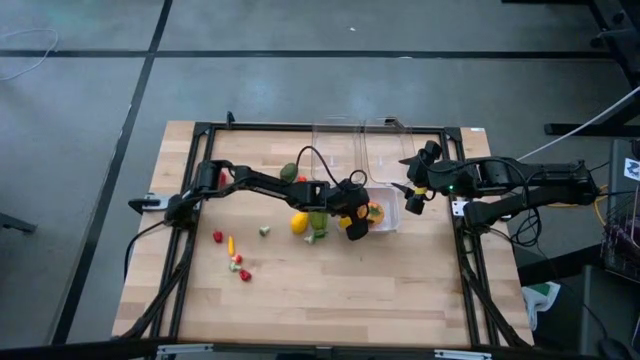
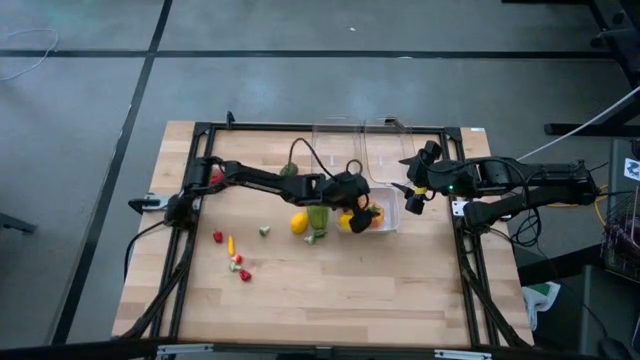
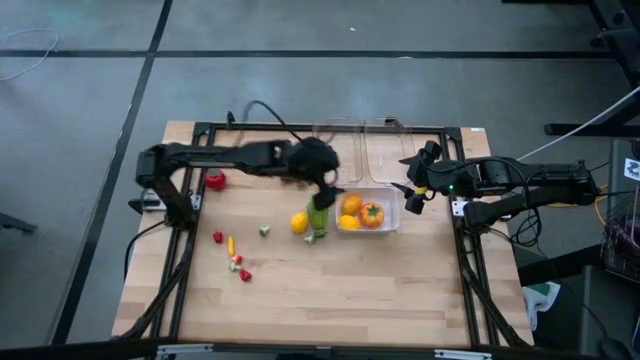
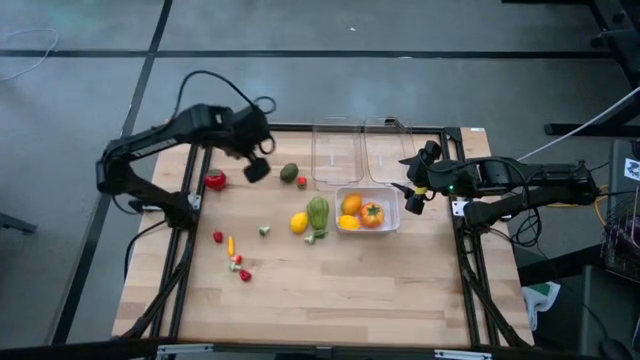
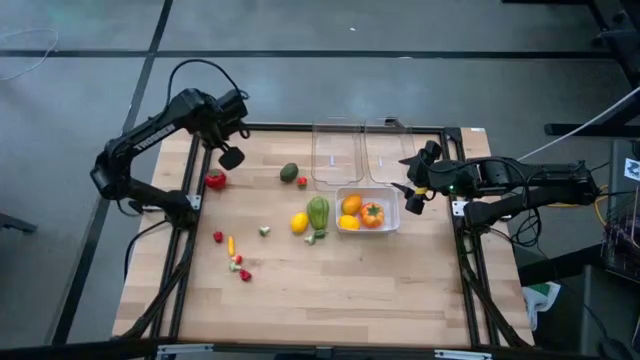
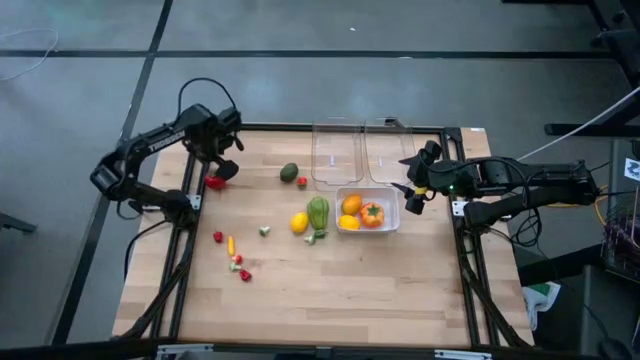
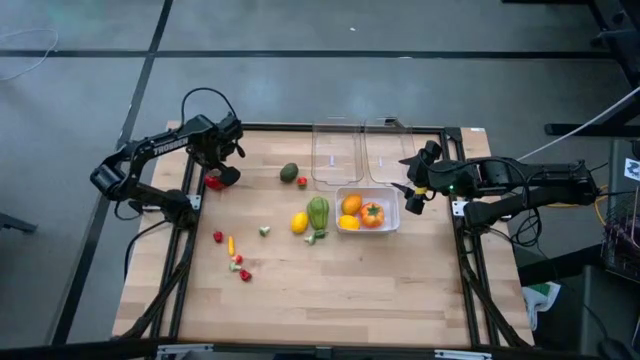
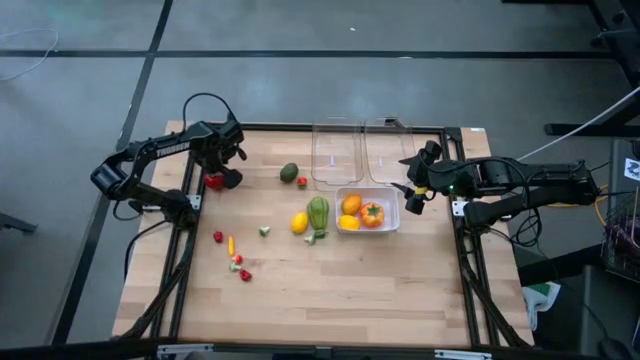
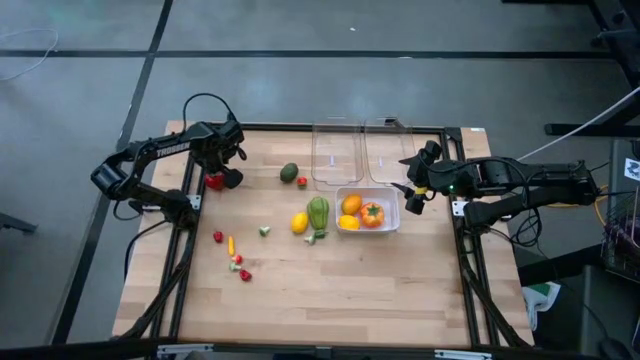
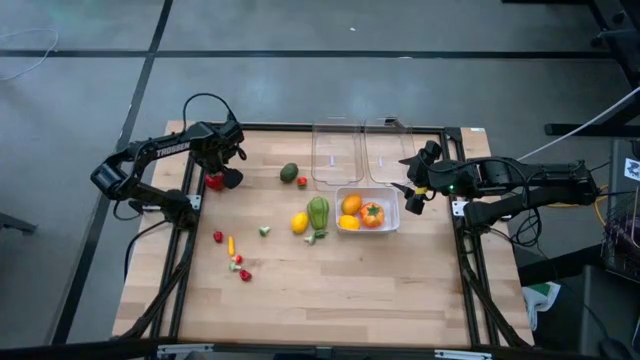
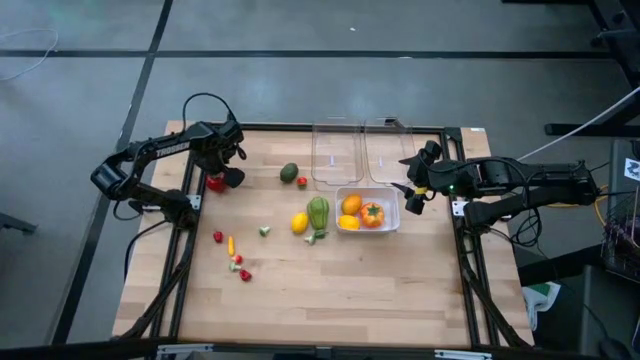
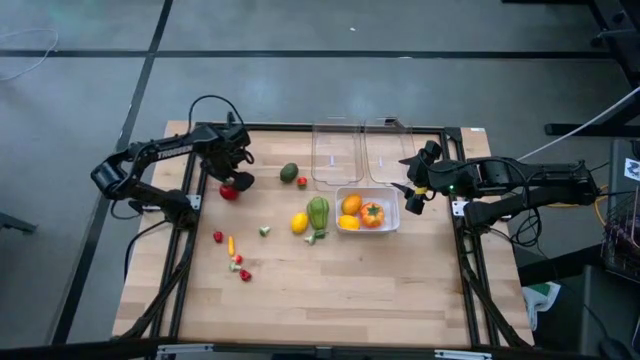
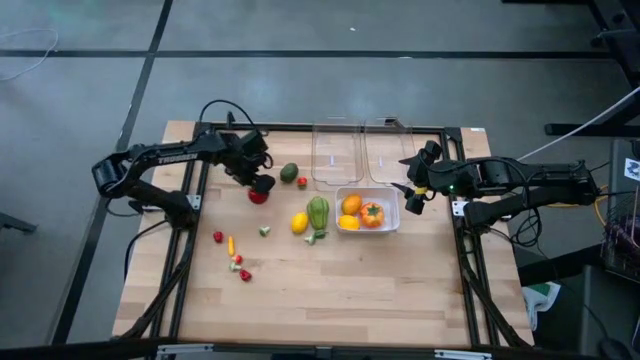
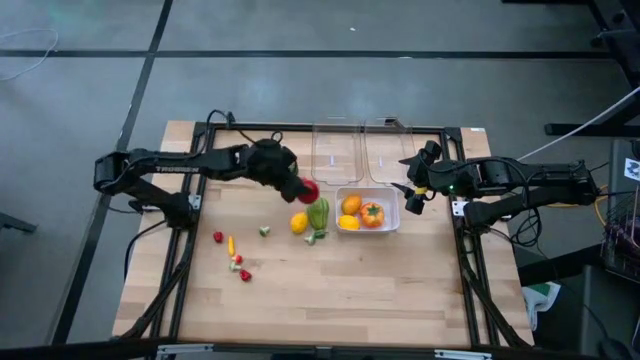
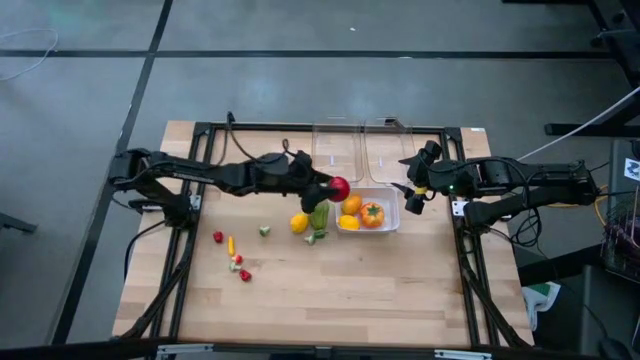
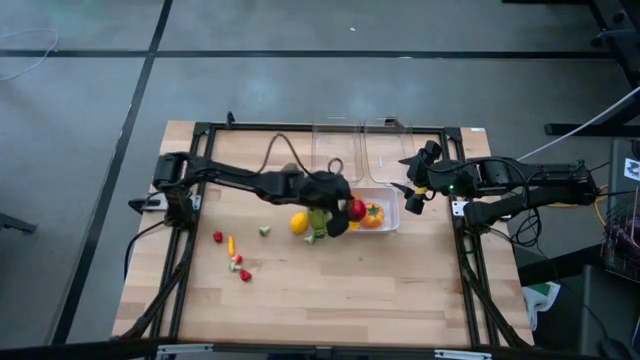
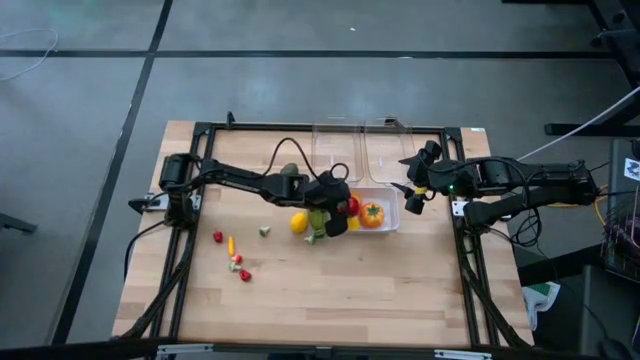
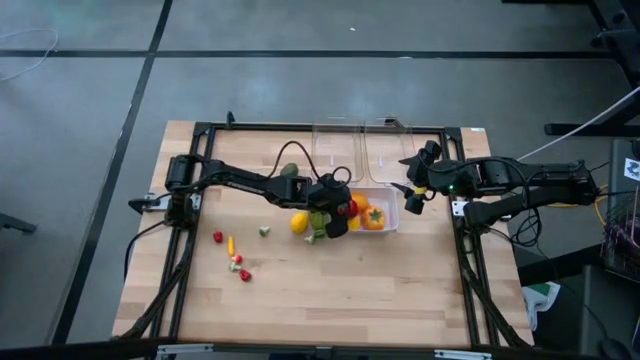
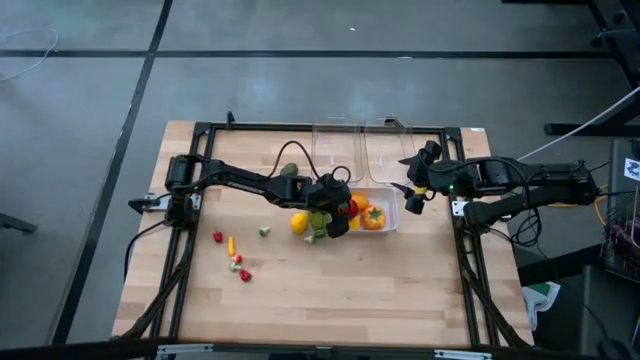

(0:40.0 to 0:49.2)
Task: Sort produce into baskets
Put the tomato into the white bin

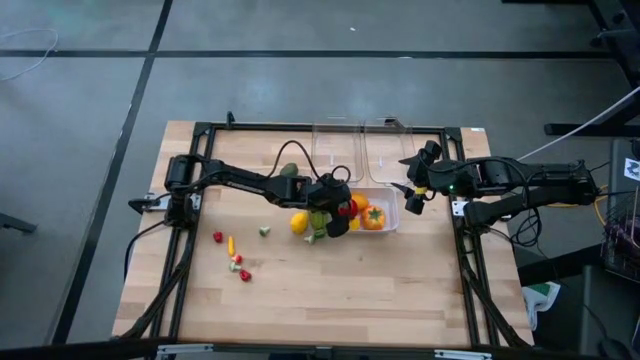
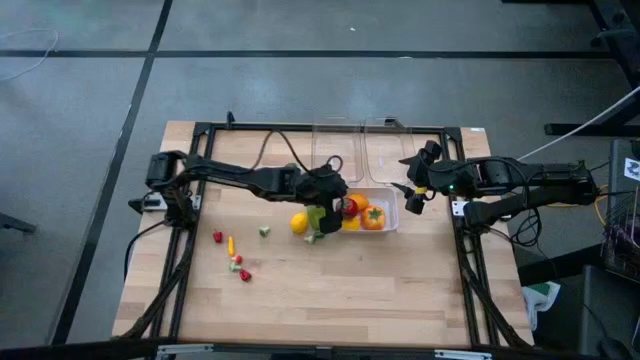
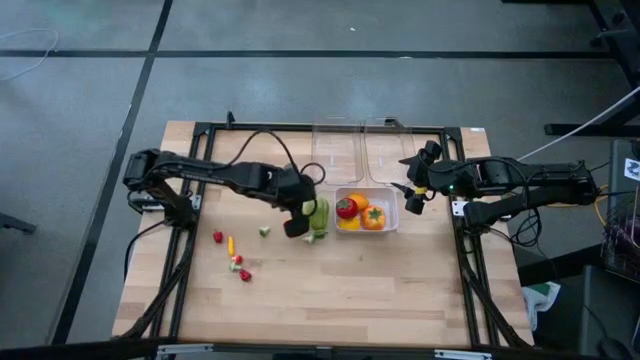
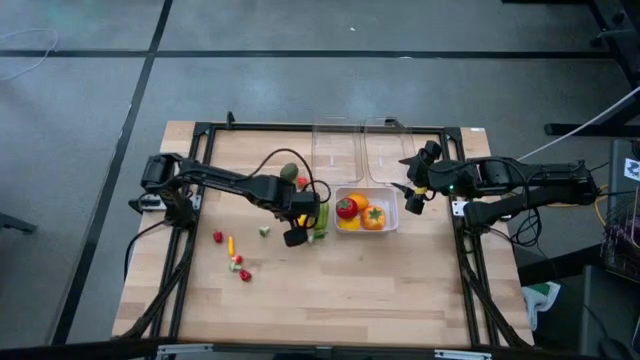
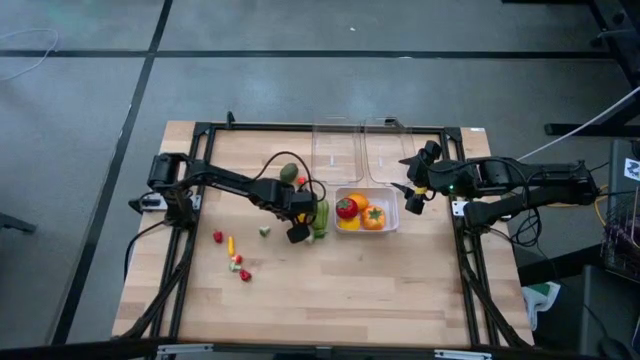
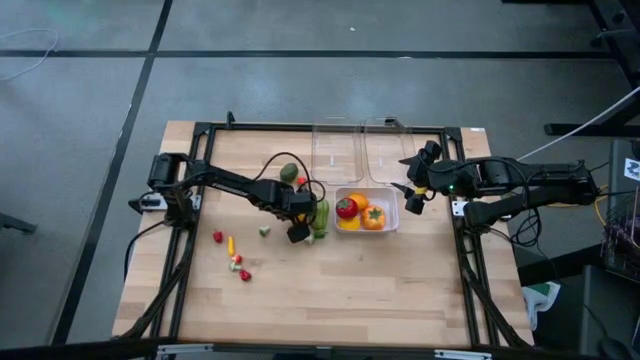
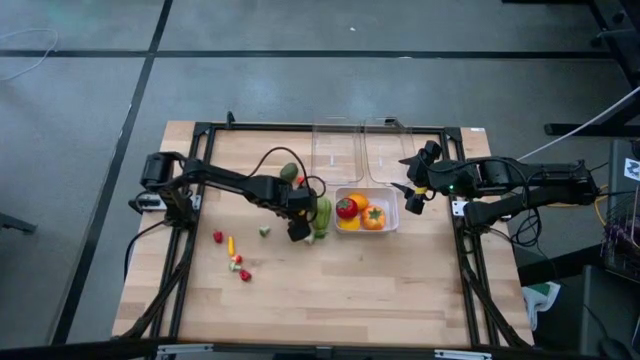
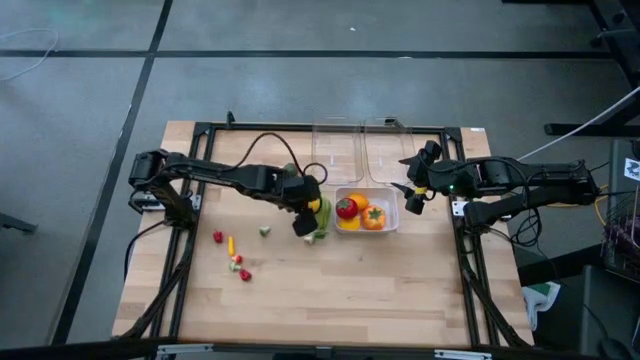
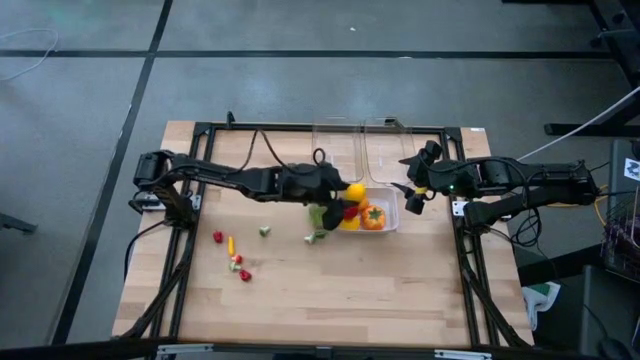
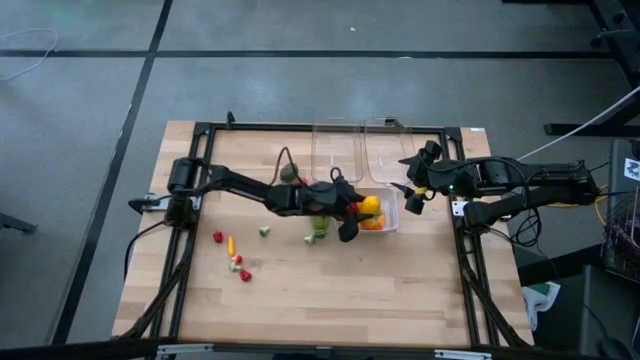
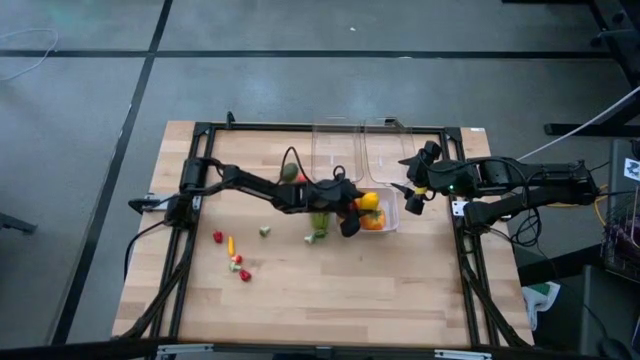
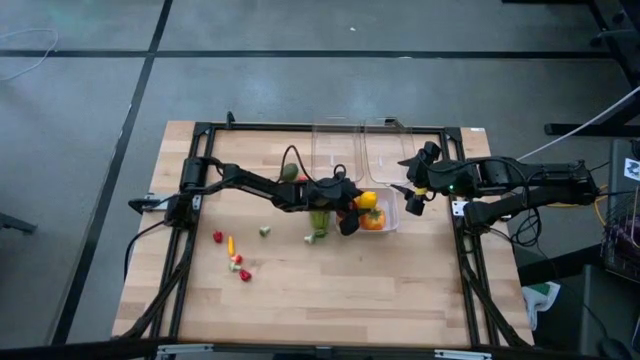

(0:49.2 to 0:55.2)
Put the lemon into the white bin

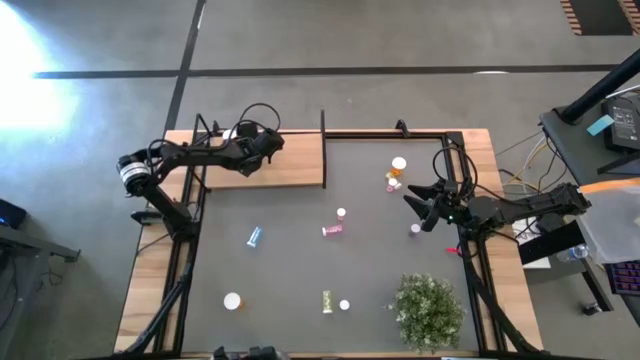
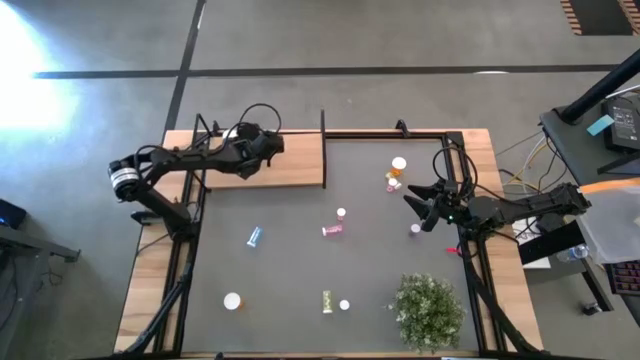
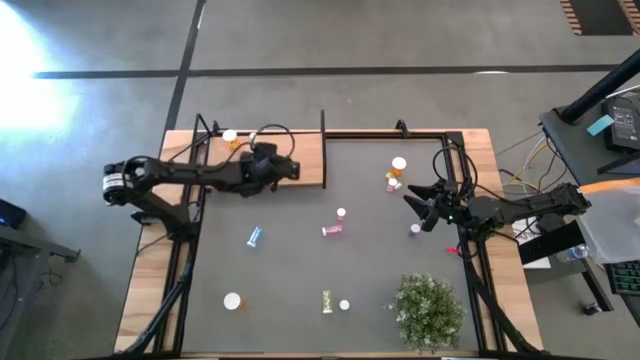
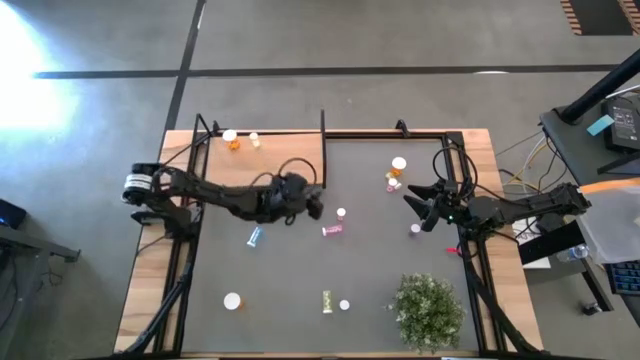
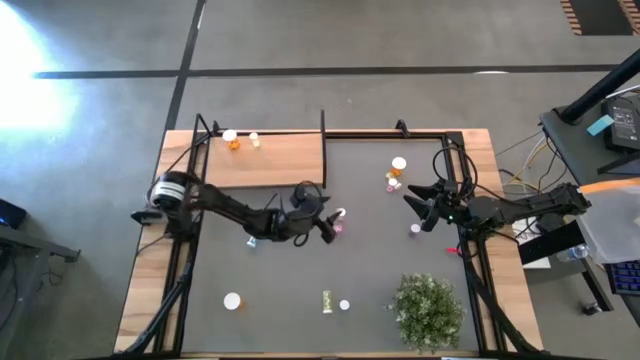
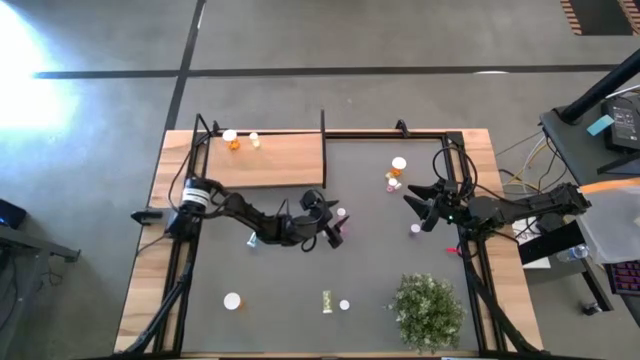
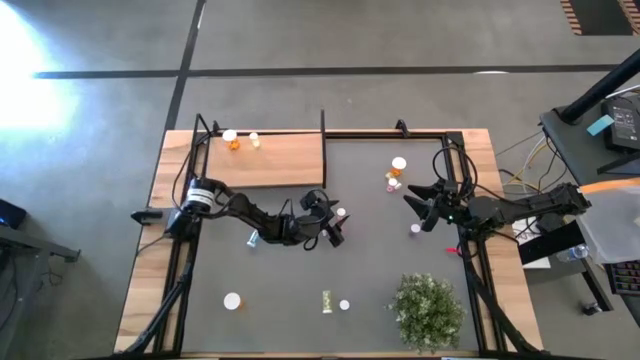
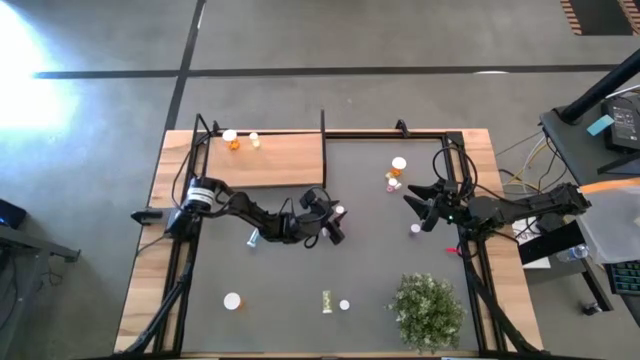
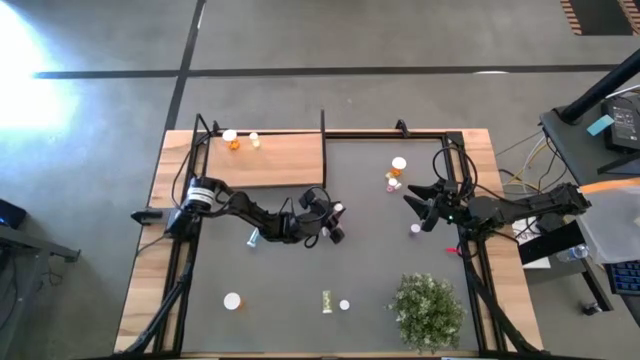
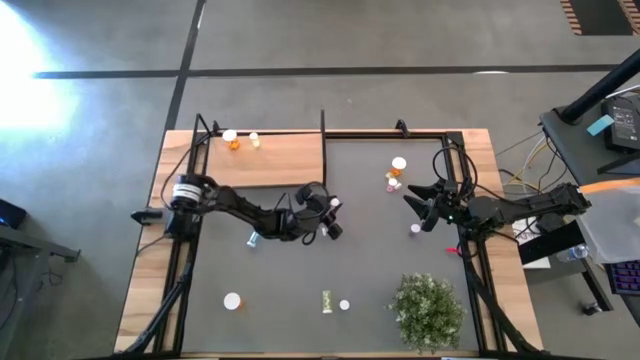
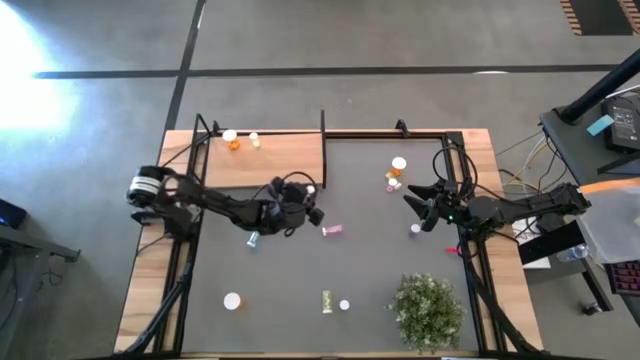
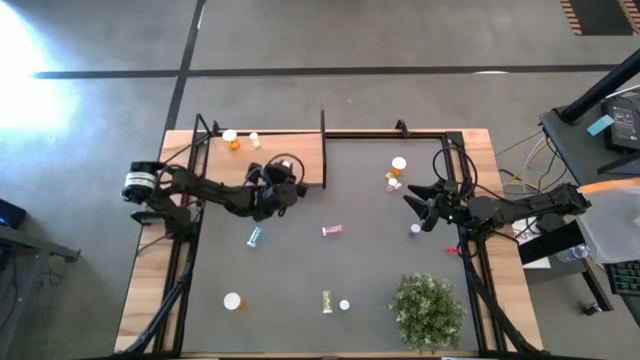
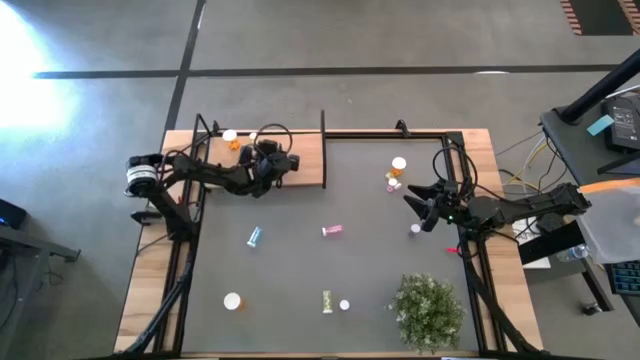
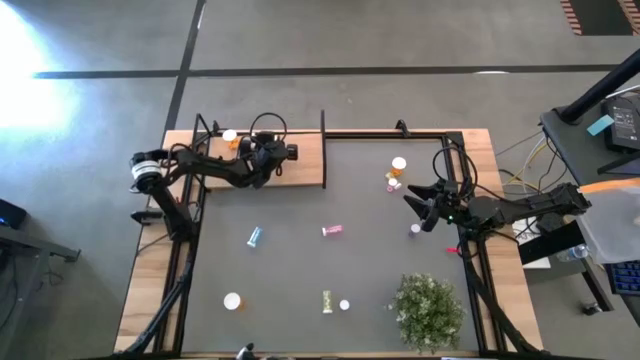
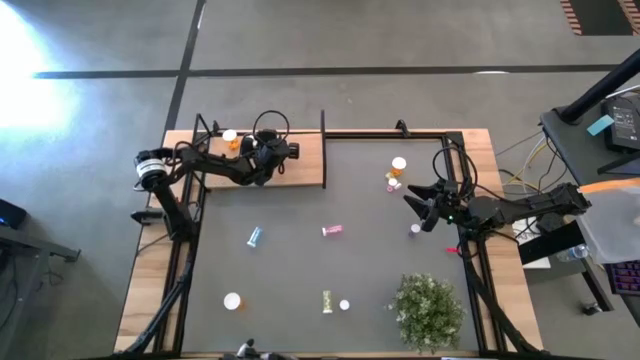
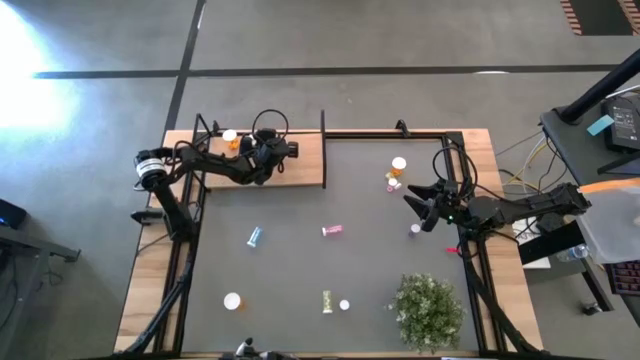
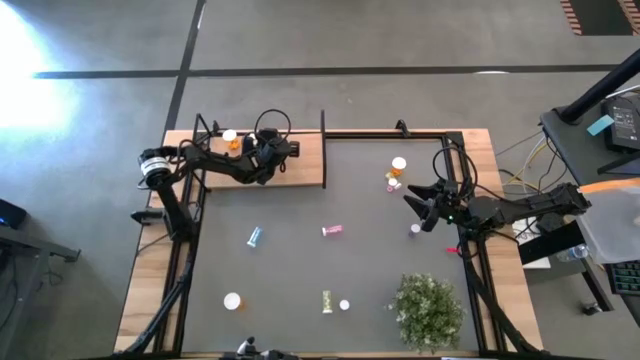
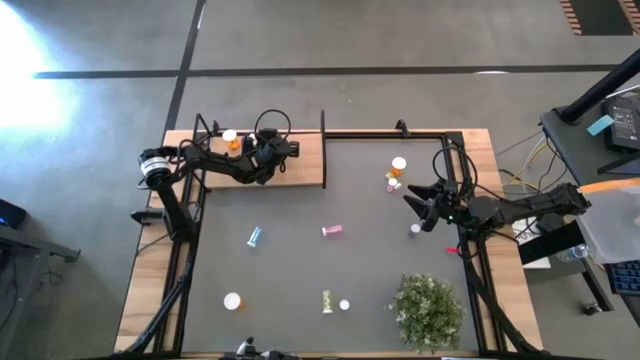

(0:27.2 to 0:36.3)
Task: Pick and place medicine bottles onto shelf by color
Put the middle pink pill bottle on the shelf
